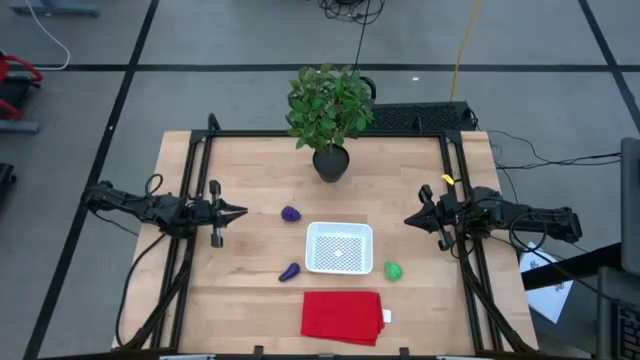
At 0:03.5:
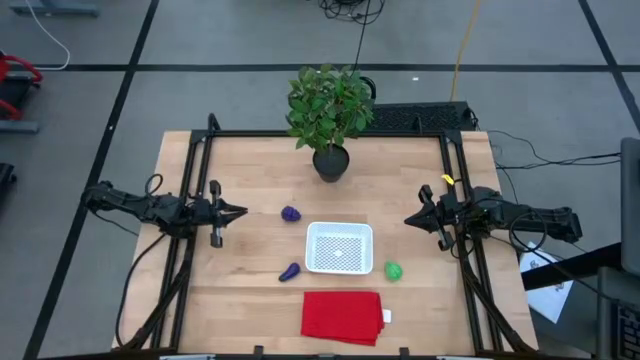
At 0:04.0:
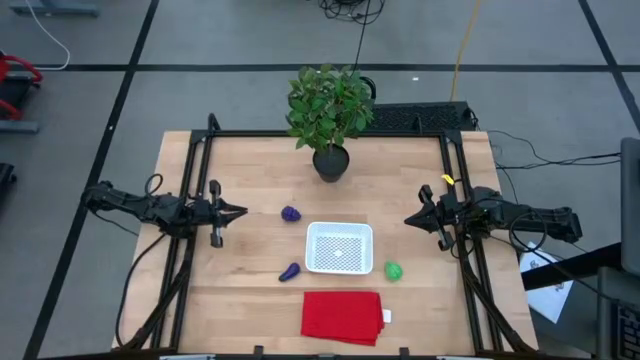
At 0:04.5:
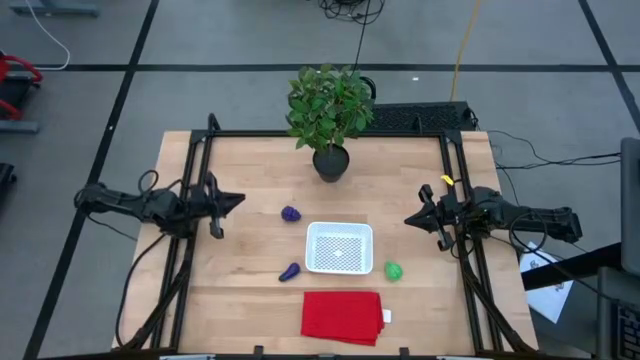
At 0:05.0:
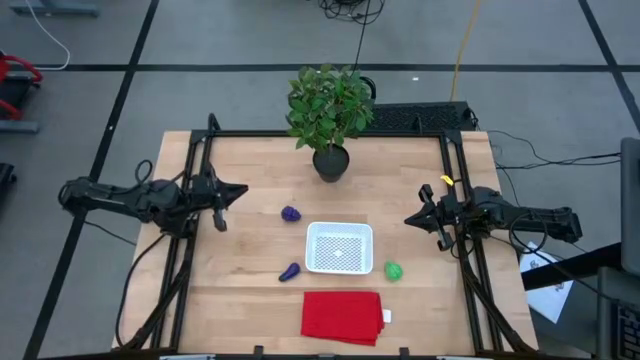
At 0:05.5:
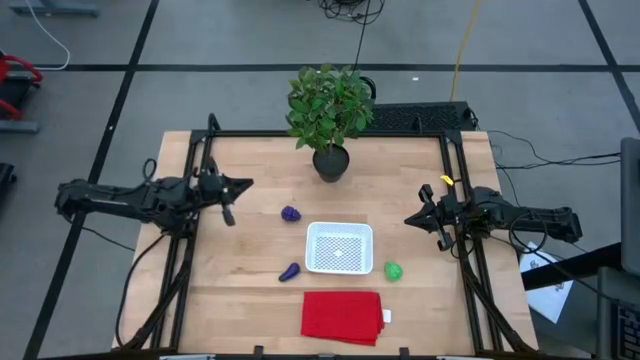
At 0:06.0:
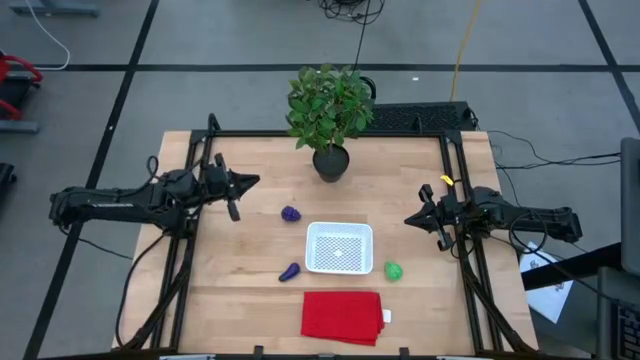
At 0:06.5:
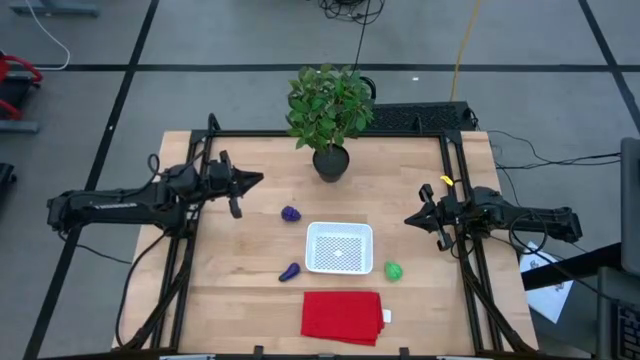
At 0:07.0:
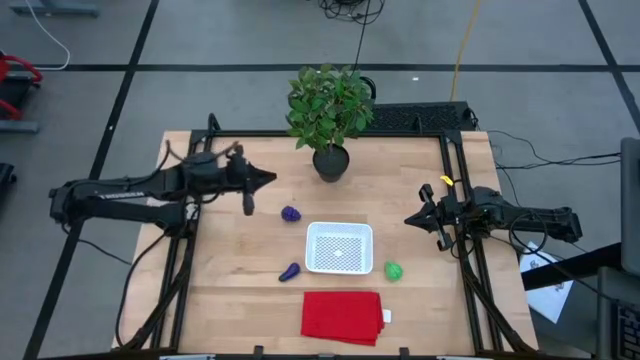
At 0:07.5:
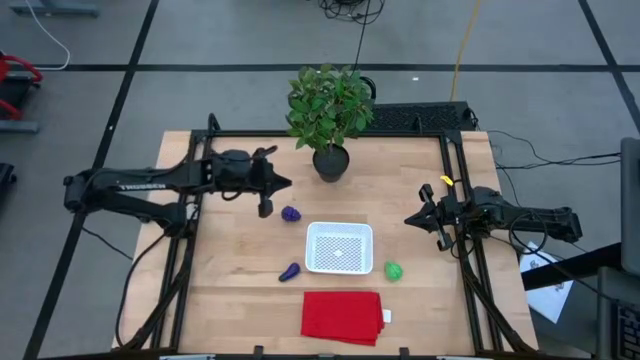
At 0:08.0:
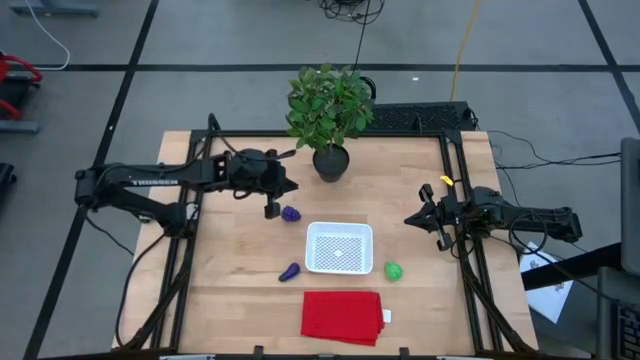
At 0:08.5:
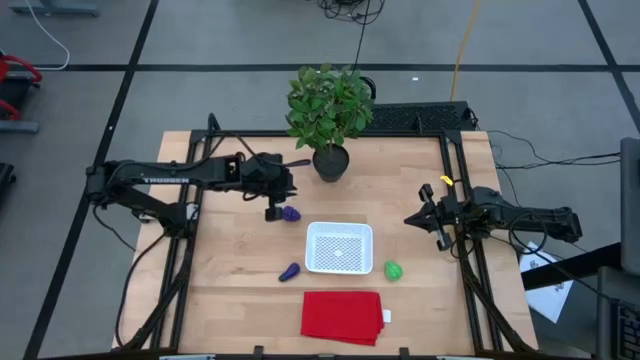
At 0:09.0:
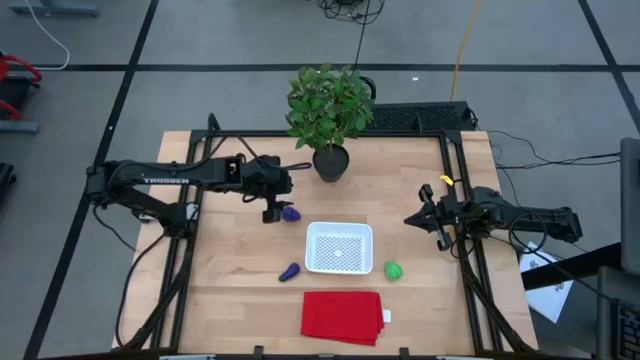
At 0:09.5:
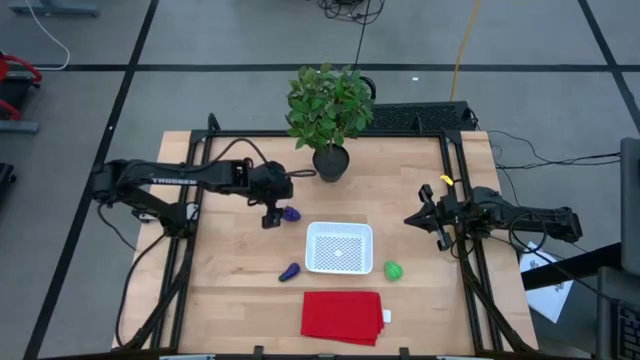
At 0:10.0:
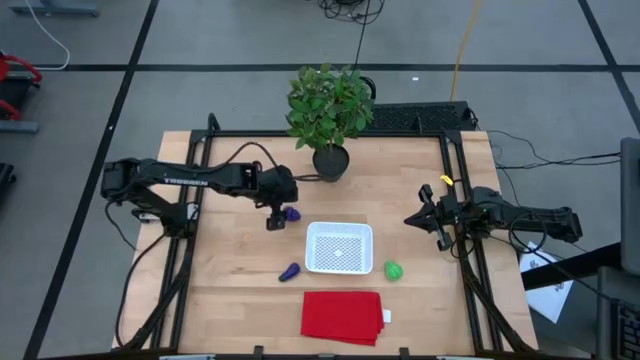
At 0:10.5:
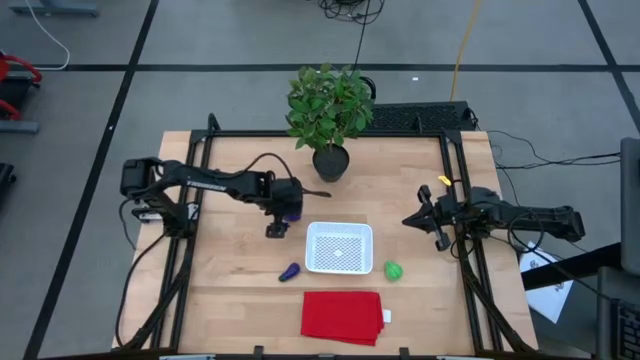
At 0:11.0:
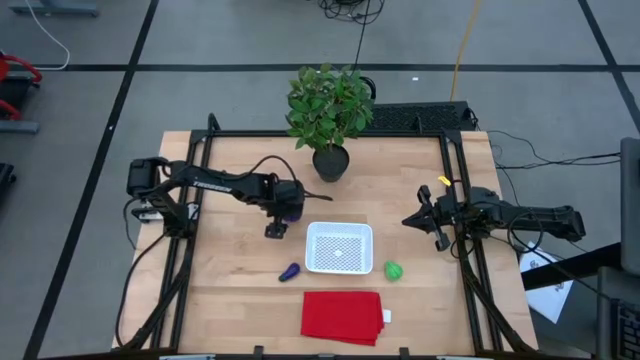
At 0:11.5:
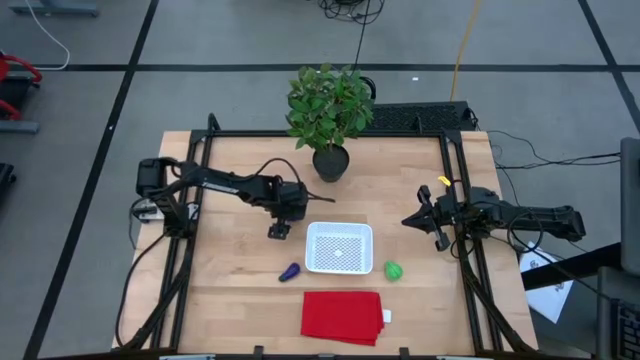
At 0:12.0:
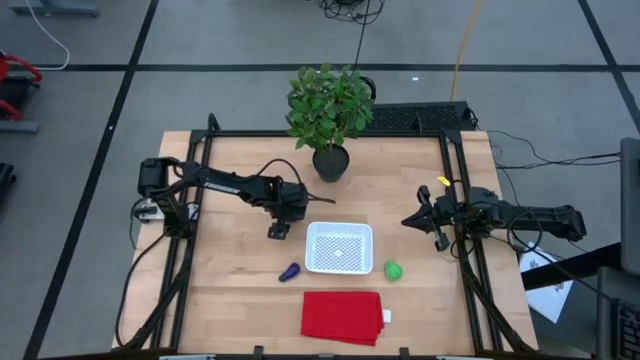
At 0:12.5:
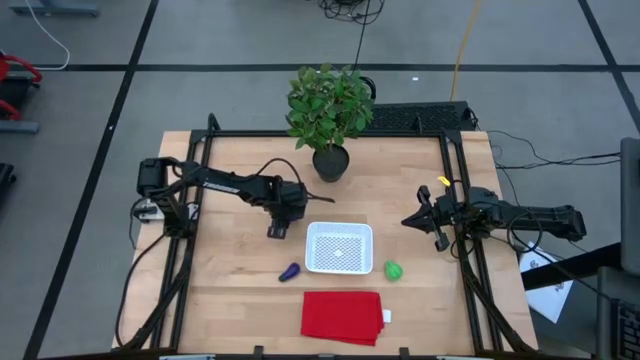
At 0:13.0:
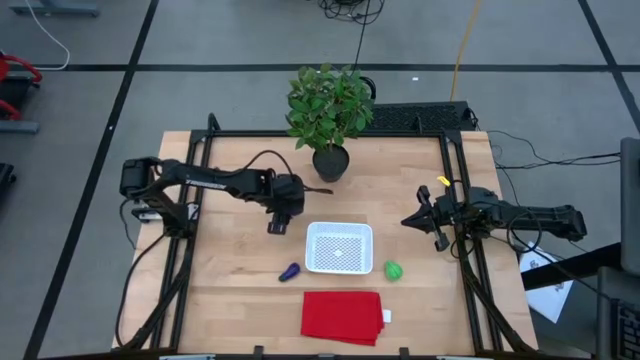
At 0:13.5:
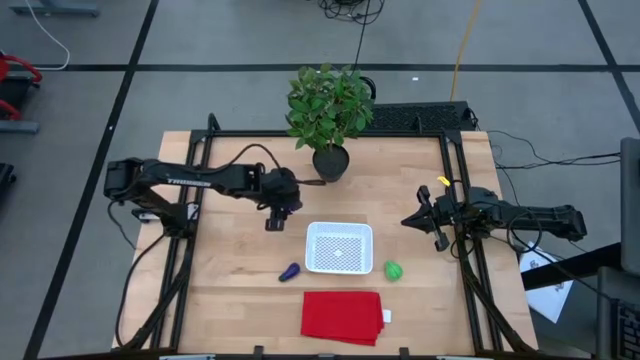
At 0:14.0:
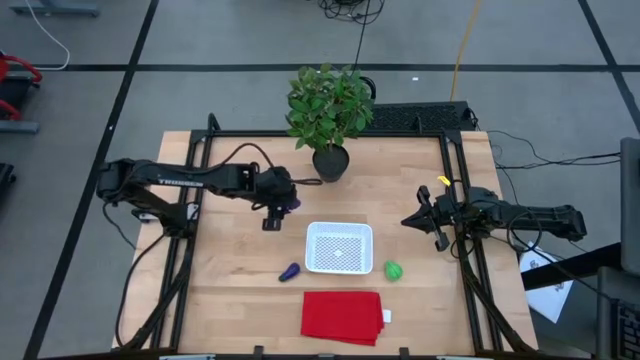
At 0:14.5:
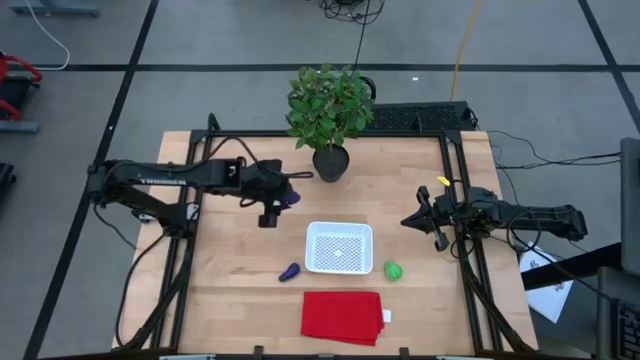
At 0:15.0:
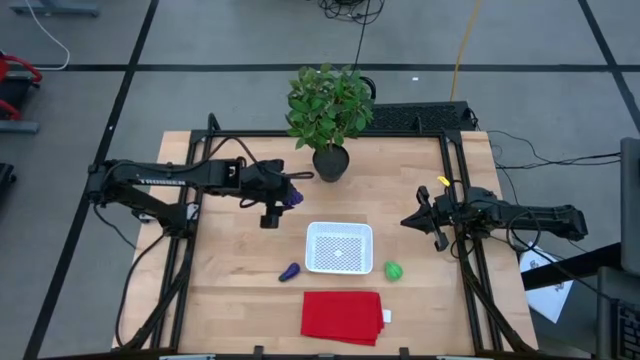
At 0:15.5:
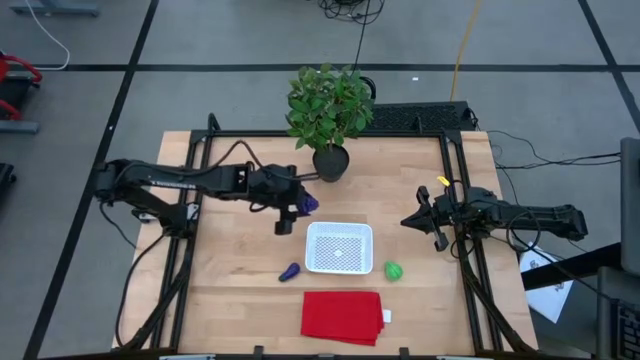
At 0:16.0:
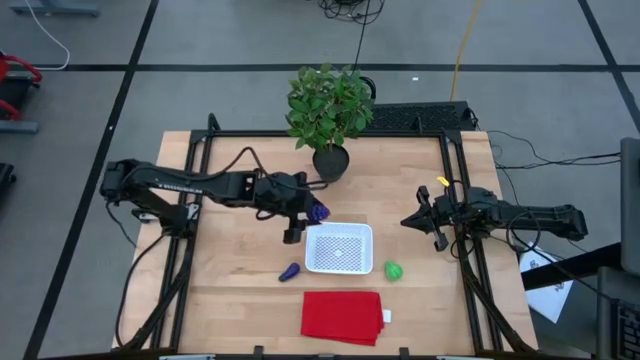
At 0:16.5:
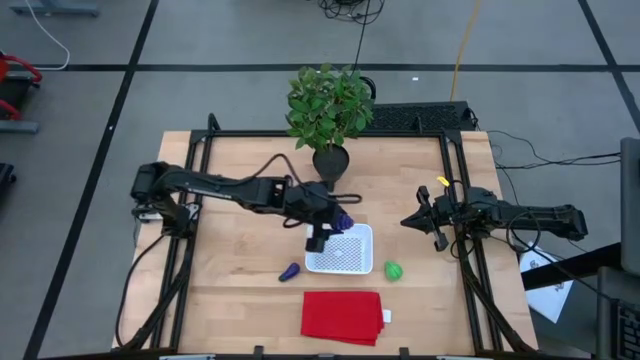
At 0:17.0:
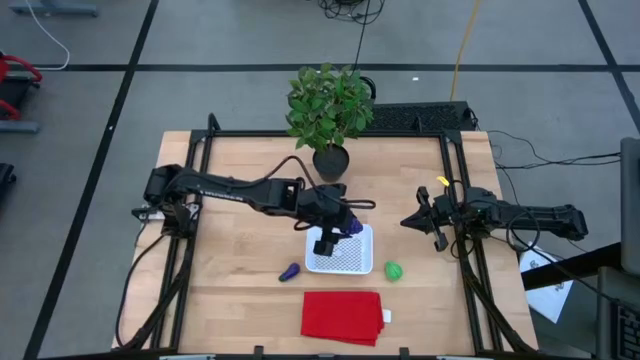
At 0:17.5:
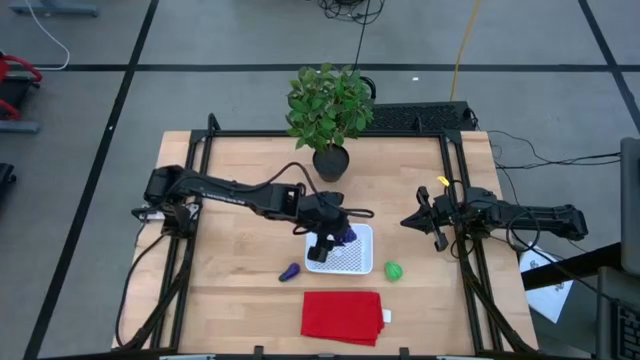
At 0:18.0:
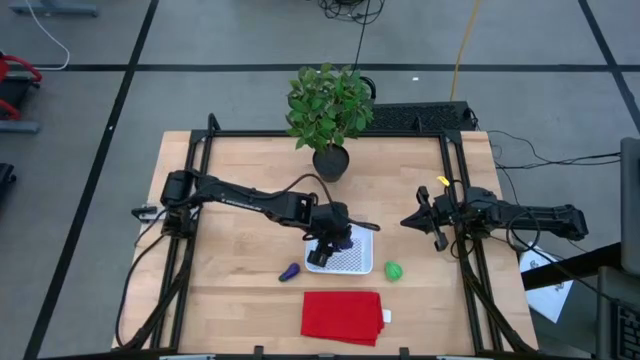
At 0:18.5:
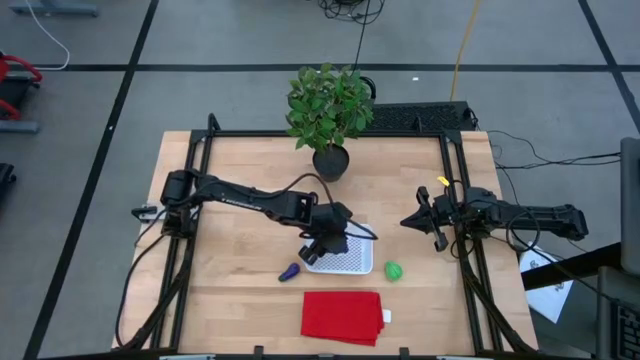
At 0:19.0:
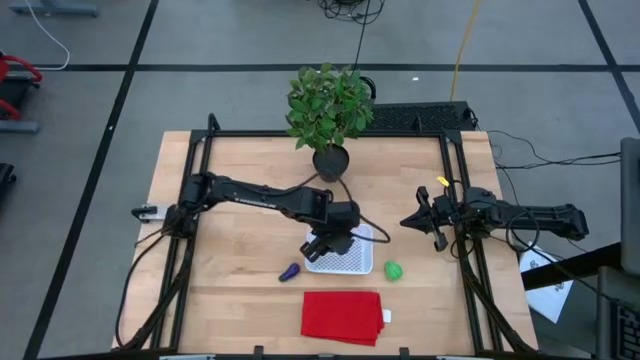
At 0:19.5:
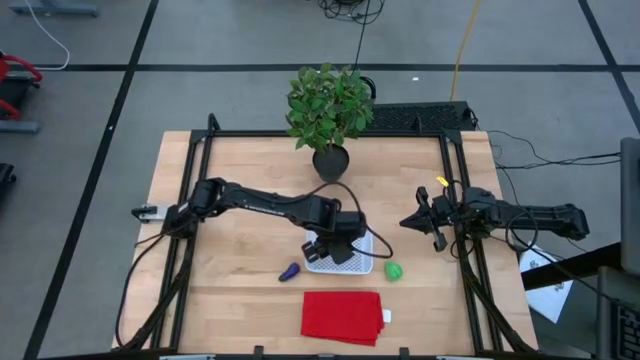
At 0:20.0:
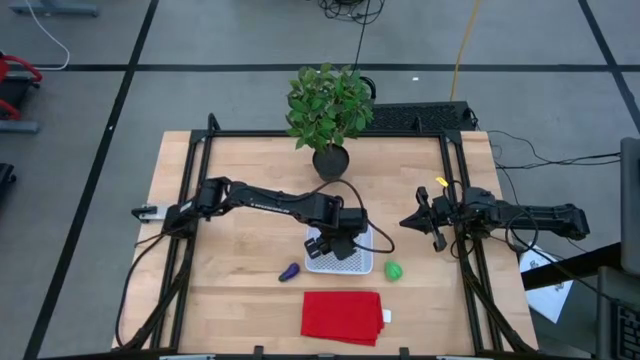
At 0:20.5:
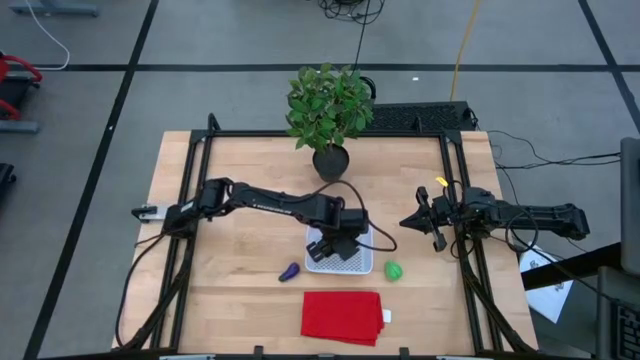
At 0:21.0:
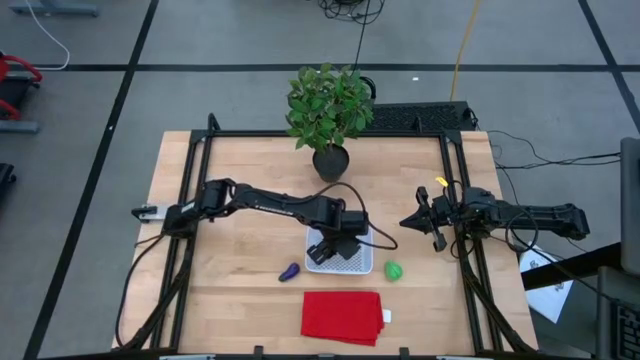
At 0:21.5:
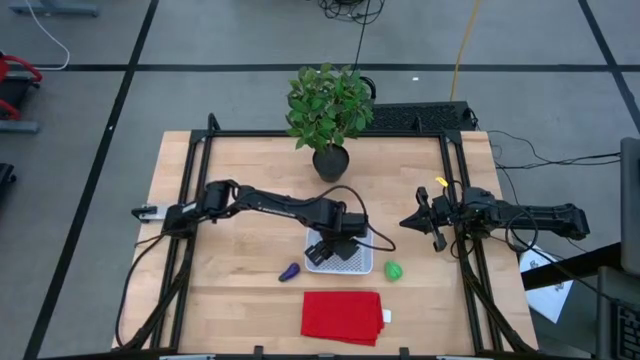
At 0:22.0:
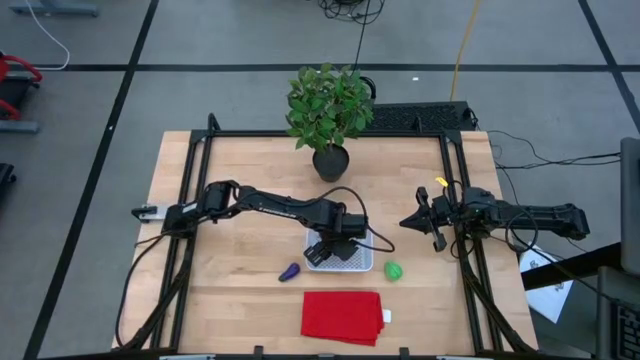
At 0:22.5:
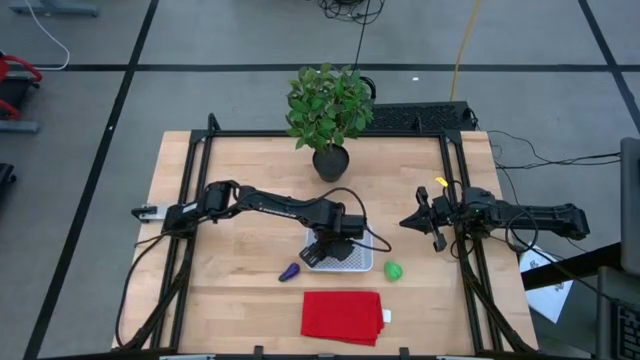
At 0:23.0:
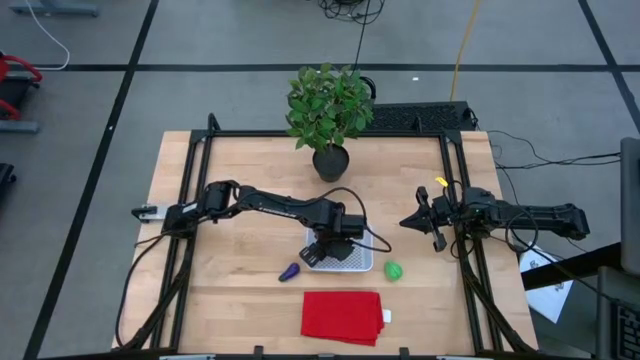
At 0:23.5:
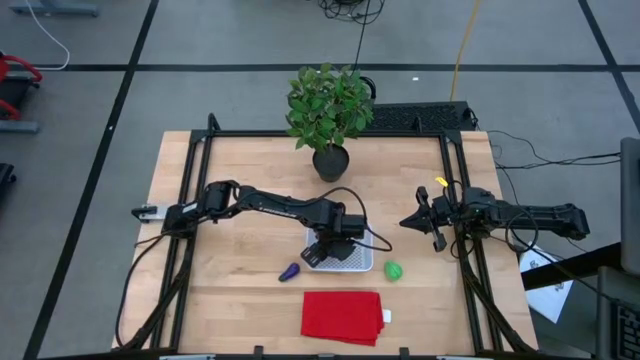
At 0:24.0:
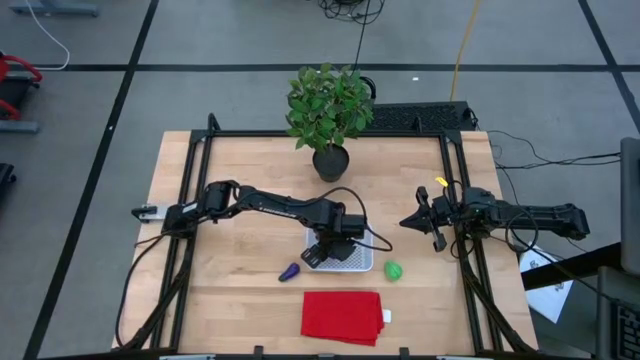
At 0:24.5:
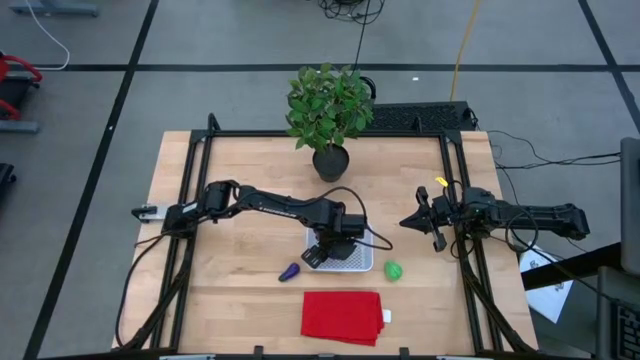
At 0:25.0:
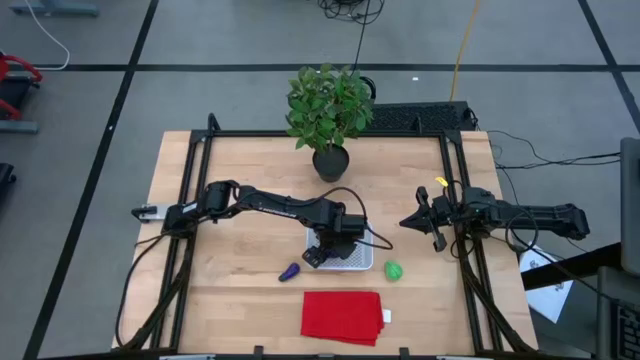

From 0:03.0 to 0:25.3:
Task: Pick and placing Produce into tupperware
Put the violet grapes into the white bin
